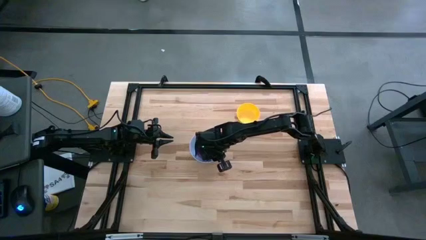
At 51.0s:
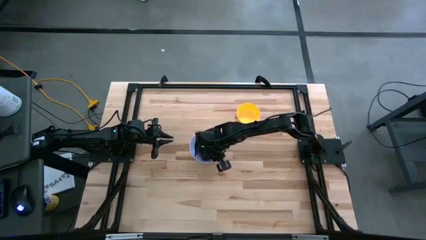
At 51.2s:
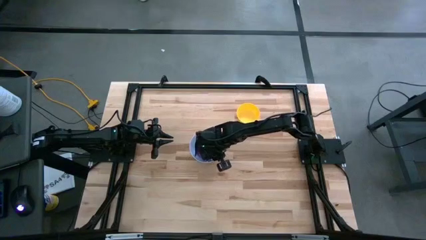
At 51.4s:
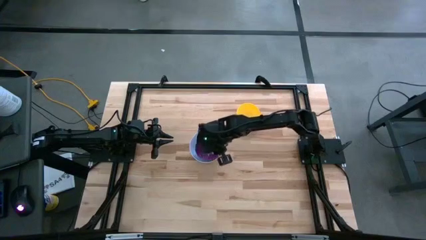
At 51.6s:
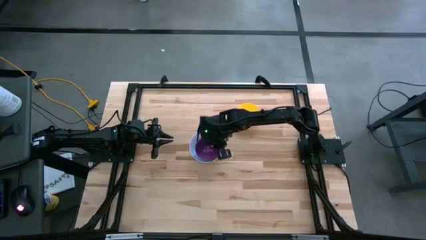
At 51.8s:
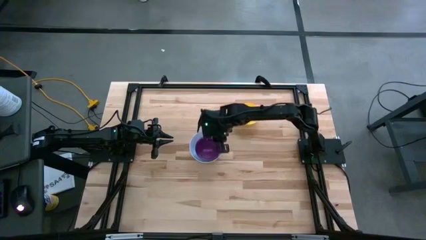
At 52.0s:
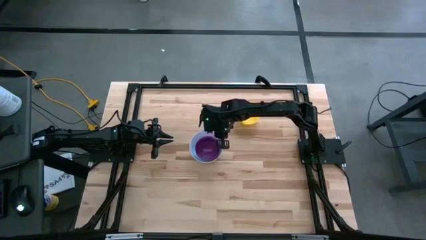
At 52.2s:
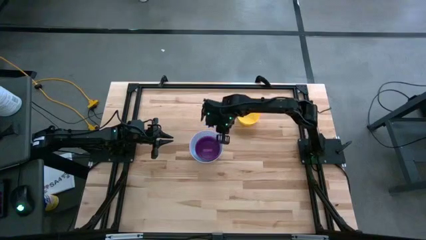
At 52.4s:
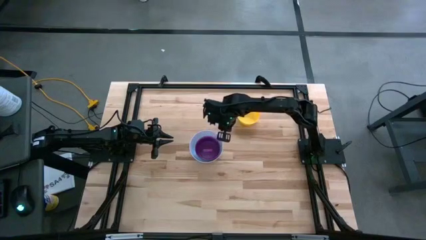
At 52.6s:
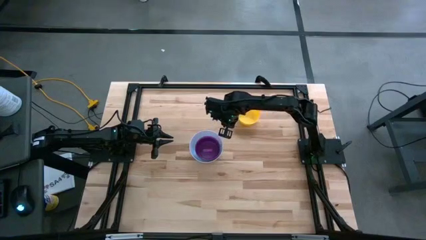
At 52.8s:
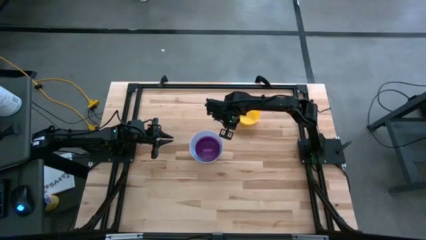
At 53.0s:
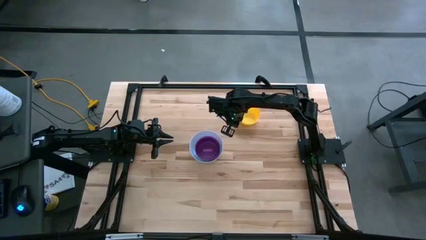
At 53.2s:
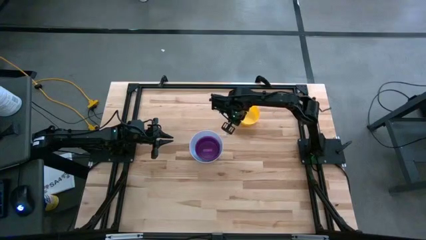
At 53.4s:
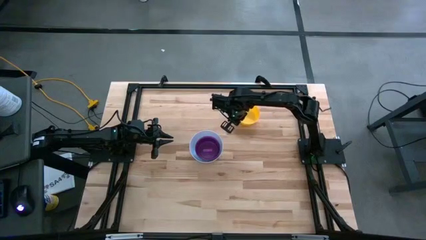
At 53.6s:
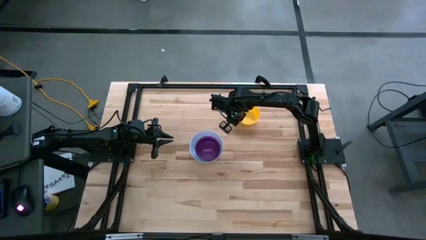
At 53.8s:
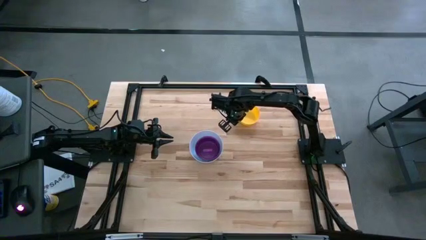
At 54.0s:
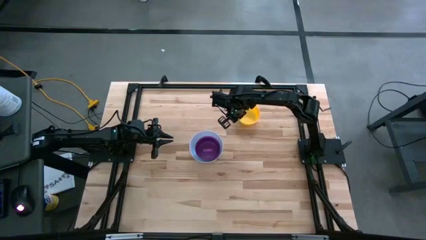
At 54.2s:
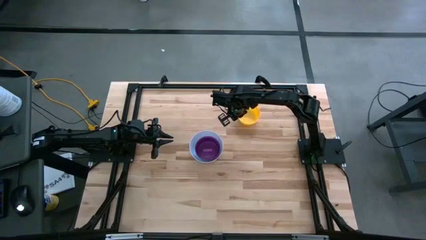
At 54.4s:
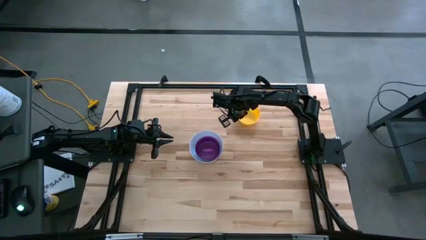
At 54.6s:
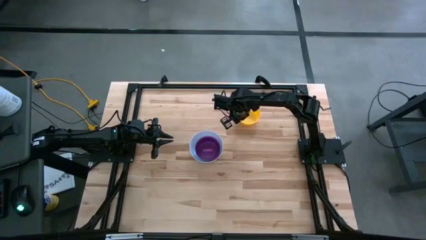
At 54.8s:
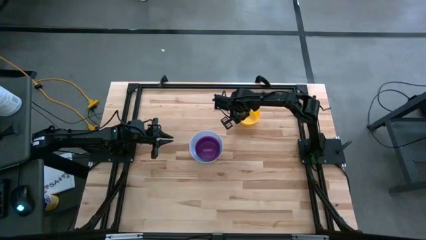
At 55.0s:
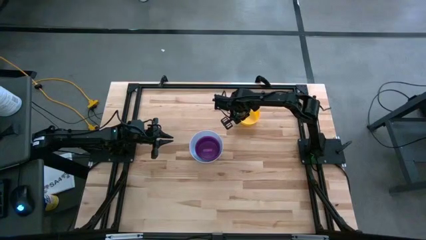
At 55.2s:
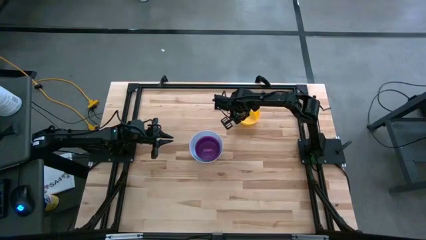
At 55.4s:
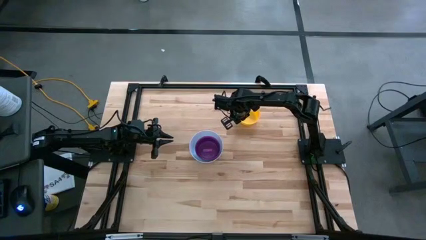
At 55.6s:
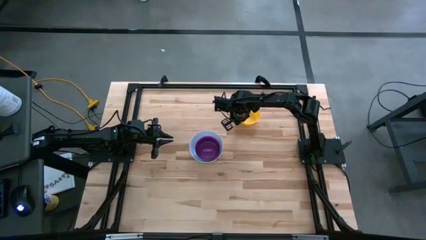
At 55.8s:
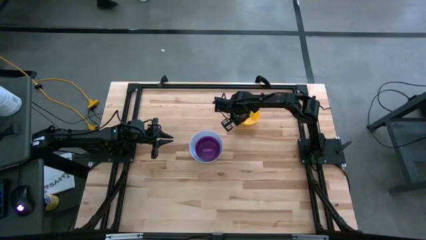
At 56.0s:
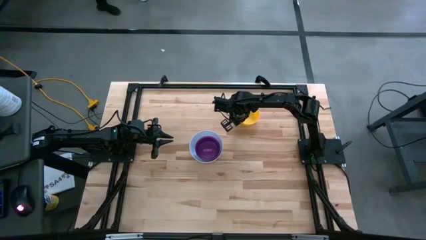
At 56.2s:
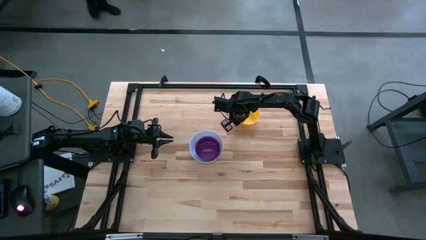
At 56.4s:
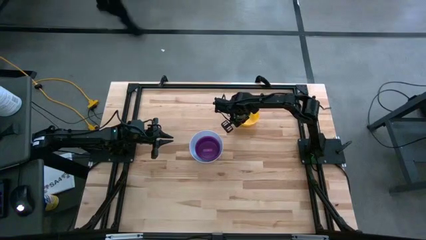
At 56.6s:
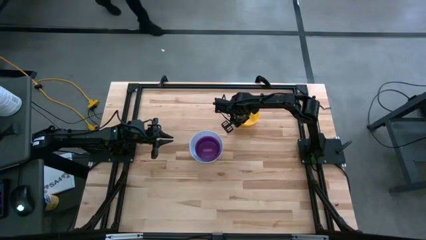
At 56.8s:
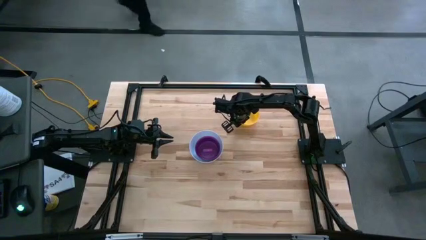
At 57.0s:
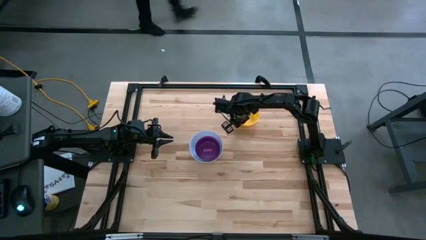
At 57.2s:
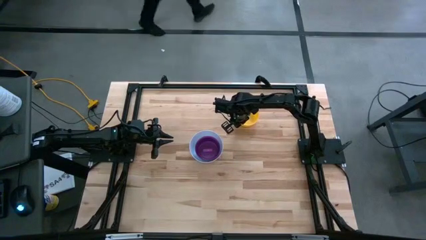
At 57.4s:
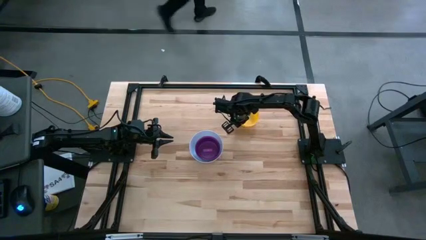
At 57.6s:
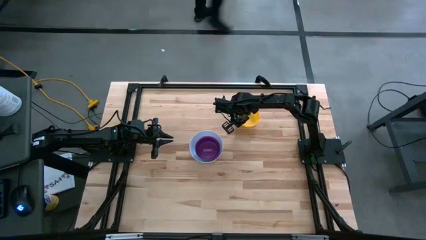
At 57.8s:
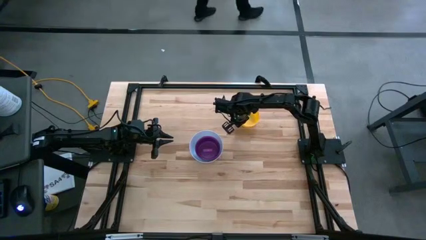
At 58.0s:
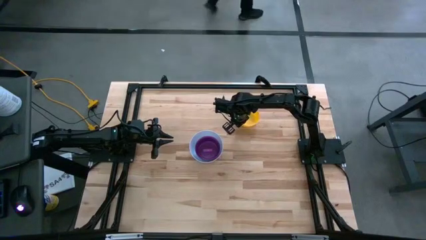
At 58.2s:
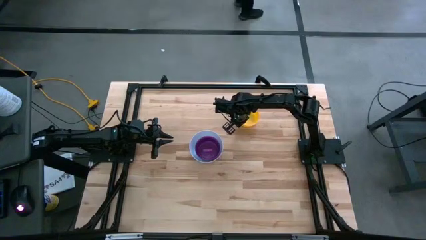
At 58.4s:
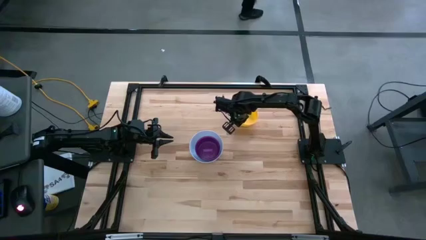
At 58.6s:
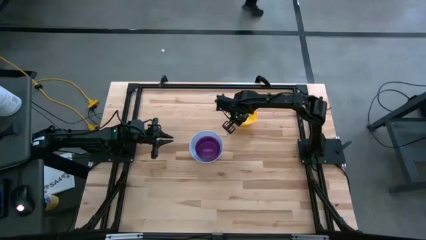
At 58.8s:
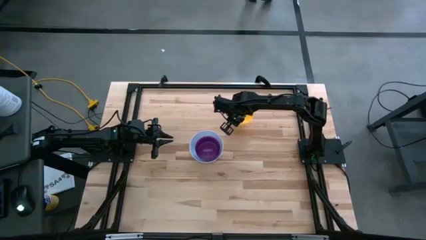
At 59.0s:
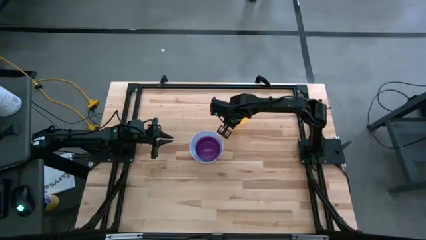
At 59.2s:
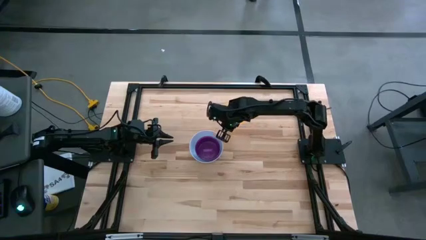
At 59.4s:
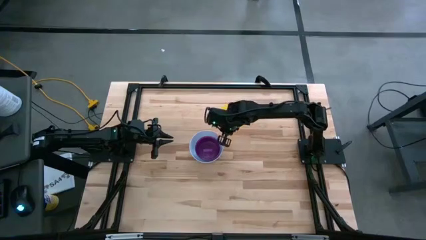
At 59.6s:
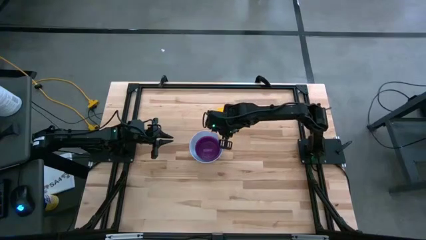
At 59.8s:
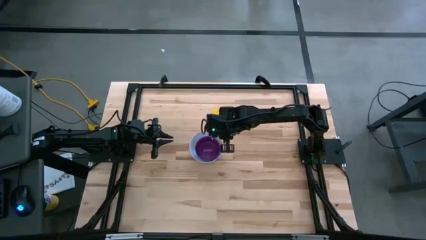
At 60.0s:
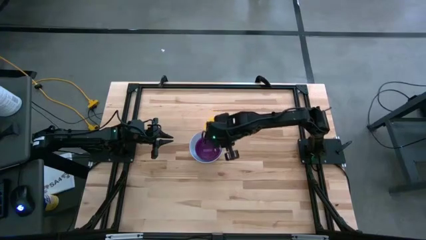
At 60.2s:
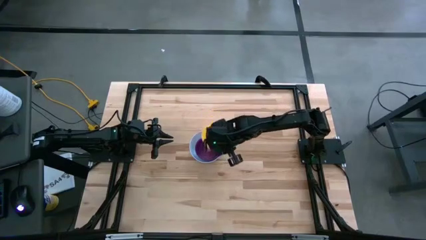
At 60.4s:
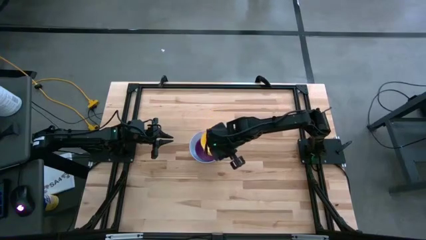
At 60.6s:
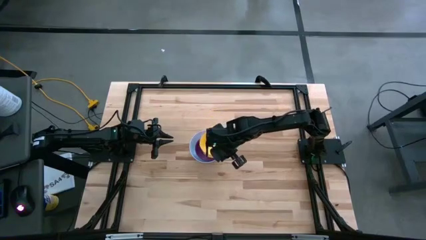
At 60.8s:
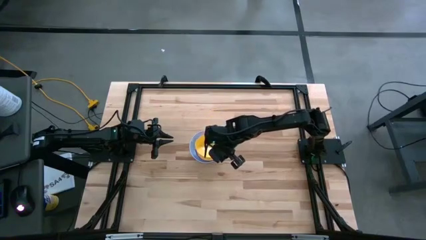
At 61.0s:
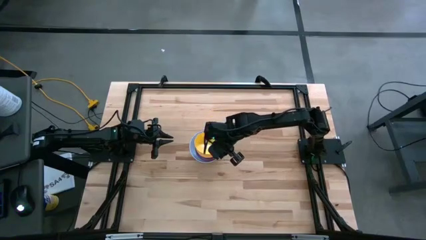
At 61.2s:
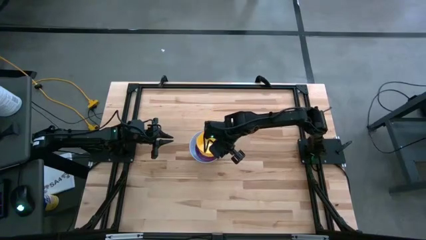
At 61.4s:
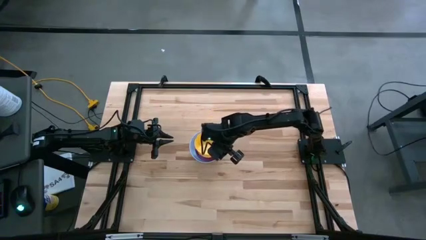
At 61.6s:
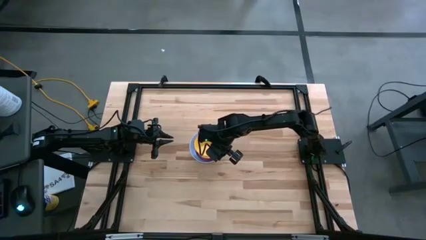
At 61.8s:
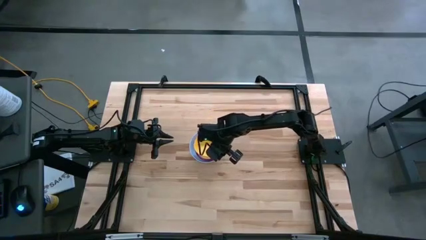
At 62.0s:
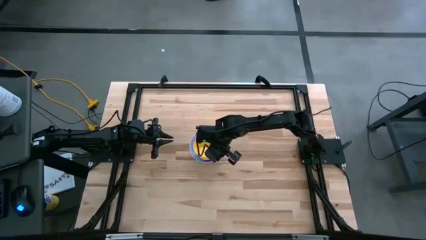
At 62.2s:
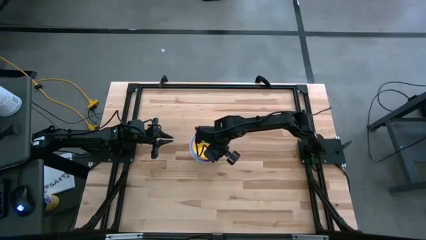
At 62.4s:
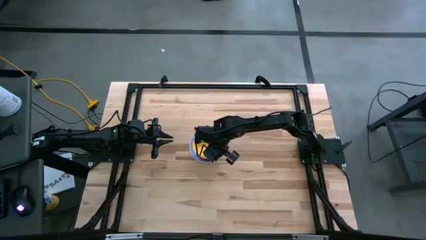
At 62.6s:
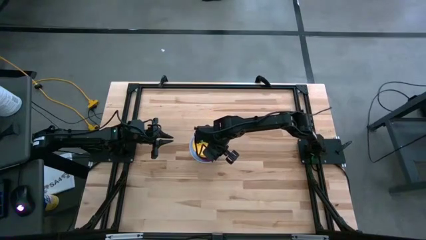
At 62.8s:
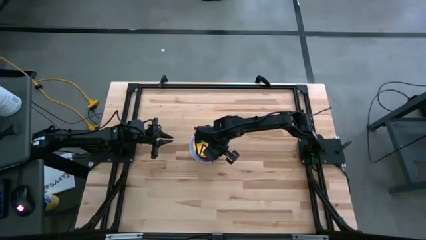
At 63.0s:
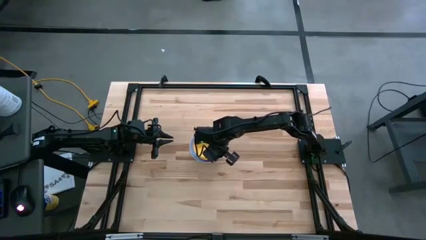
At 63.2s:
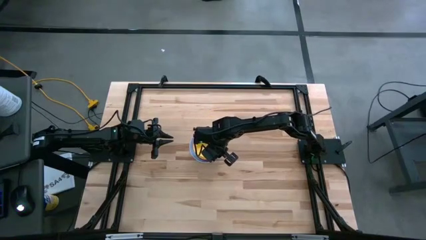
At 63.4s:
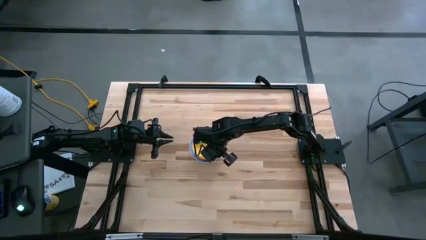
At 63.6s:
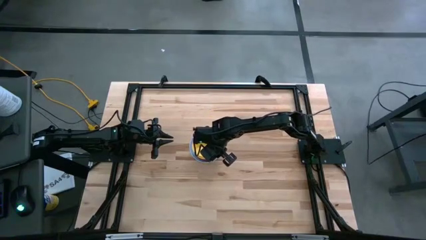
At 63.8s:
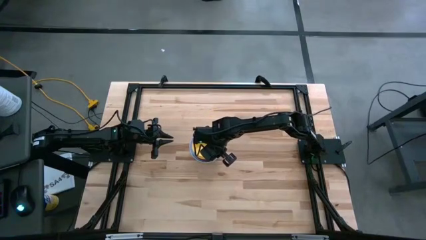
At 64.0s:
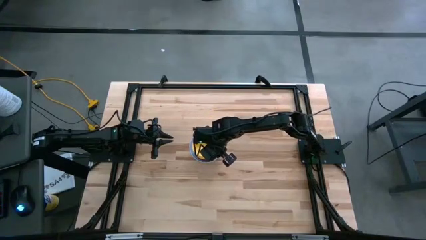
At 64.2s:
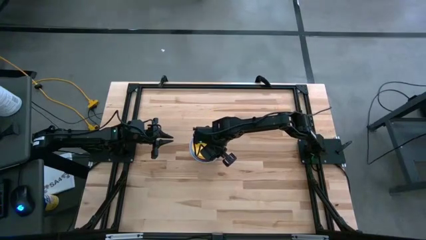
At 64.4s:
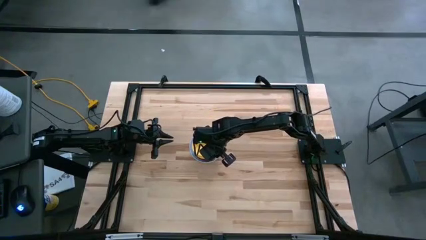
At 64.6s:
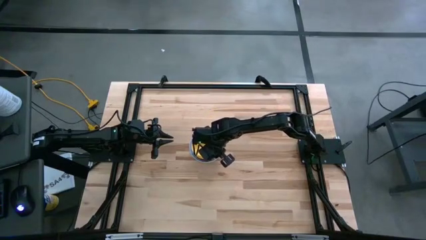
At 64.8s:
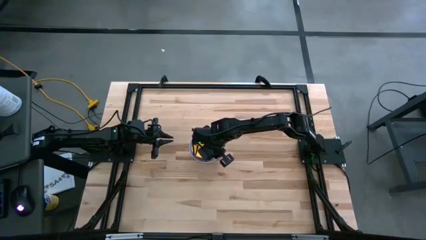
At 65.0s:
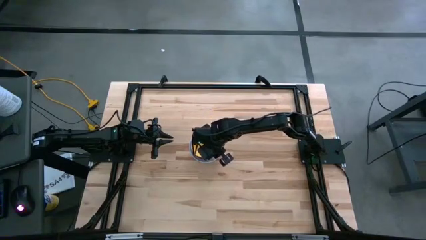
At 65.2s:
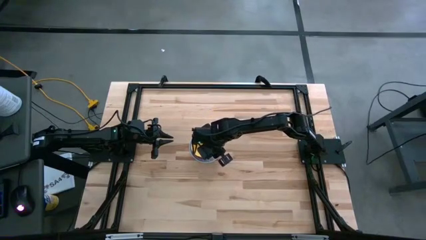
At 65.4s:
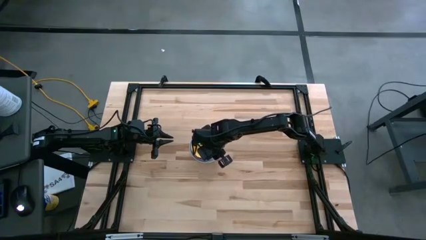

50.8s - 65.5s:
Stack the yellow bowl on the purple bowl

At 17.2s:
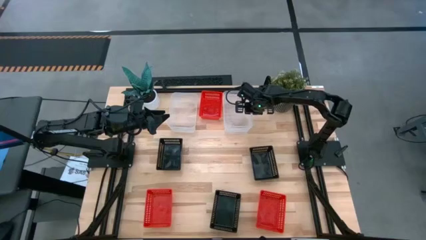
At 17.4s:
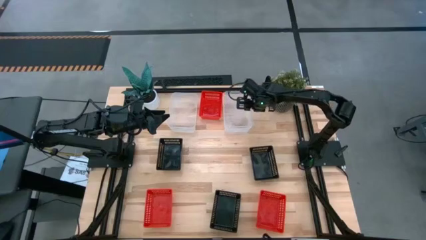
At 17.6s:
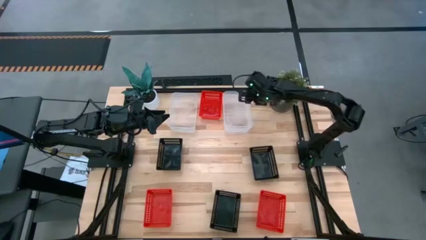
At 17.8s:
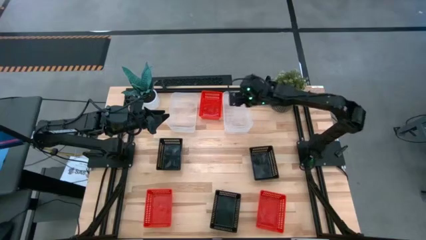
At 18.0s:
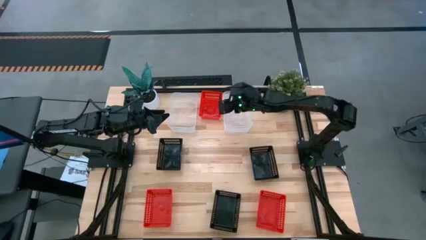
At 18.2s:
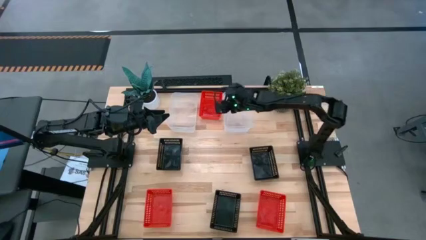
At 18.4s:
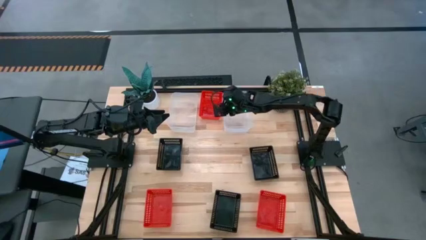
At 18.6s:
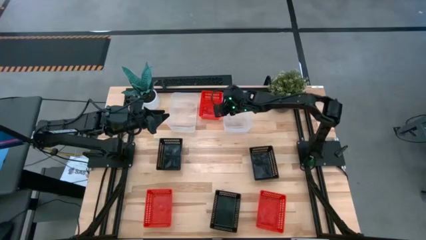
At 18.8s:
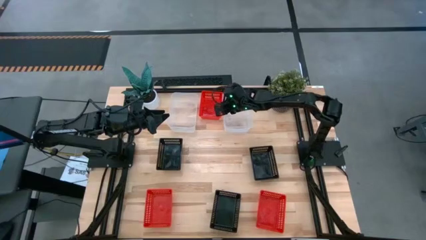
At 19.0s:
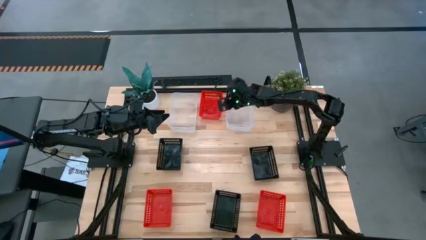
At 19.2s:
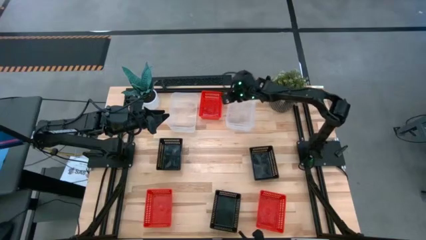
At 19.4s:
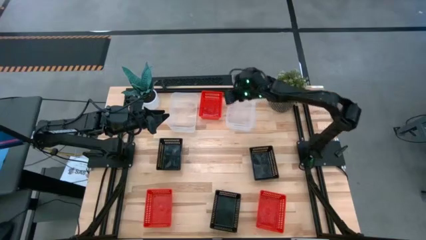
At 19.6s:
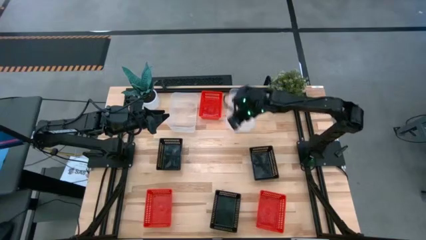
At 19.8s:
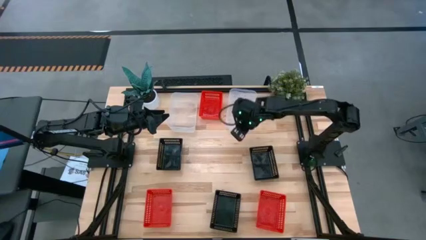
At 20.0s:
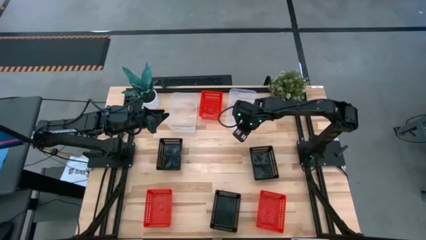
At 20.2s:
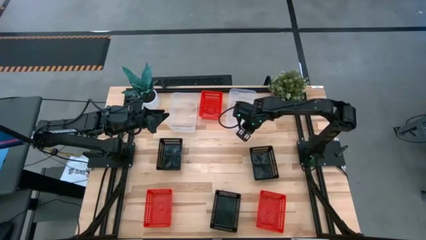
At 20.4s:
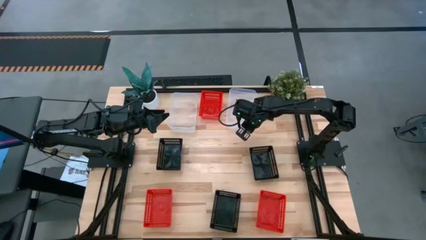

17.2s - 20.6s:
Adjust the stacked transparent bin
